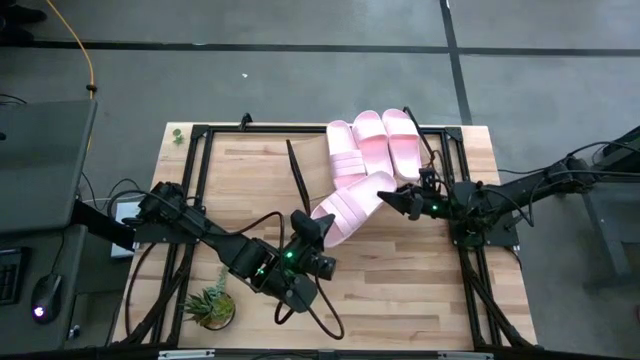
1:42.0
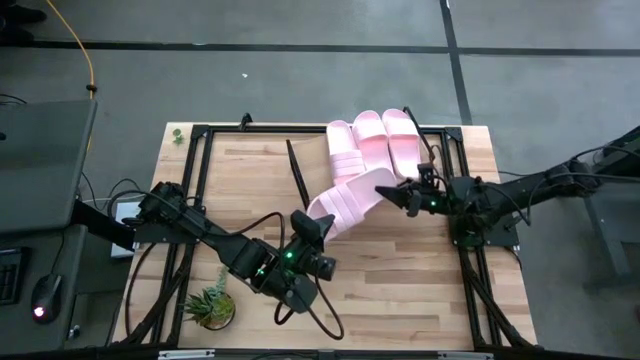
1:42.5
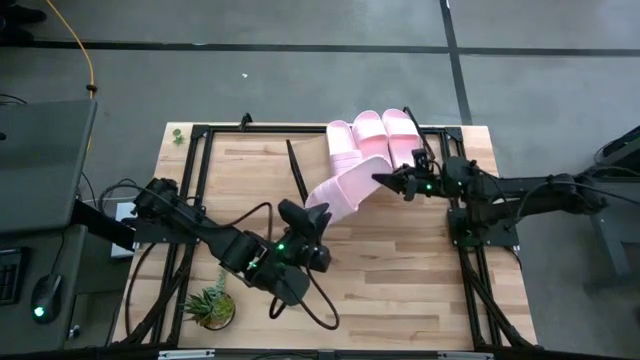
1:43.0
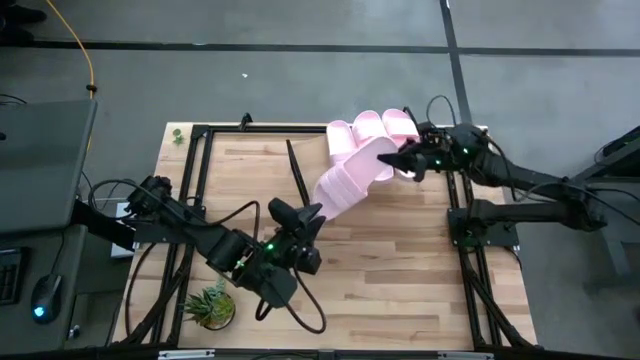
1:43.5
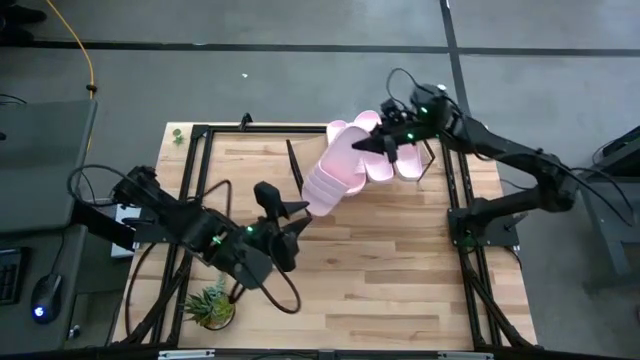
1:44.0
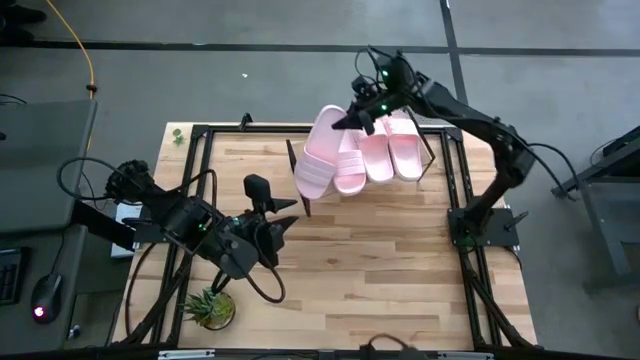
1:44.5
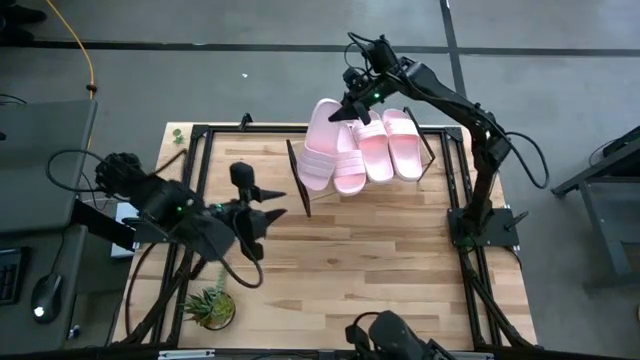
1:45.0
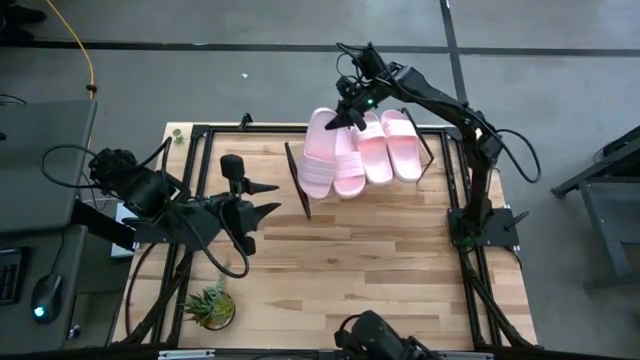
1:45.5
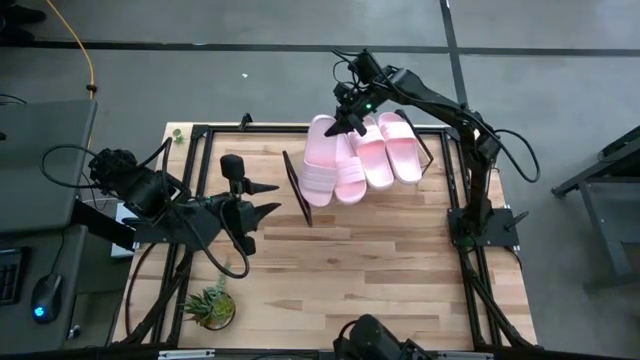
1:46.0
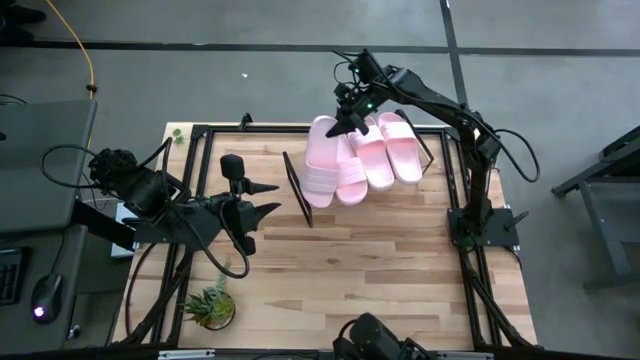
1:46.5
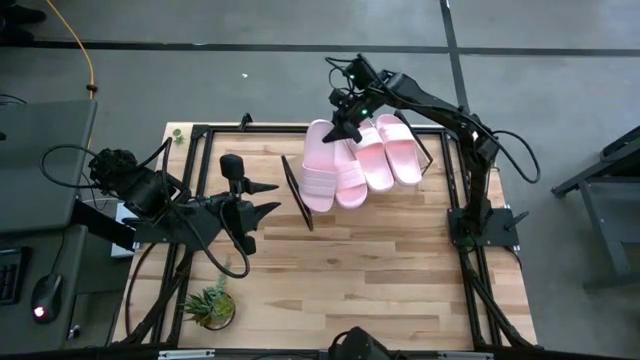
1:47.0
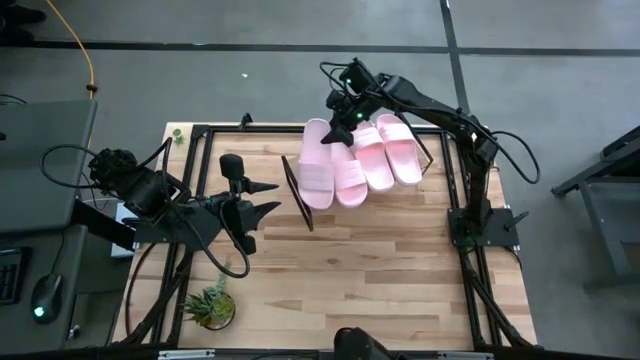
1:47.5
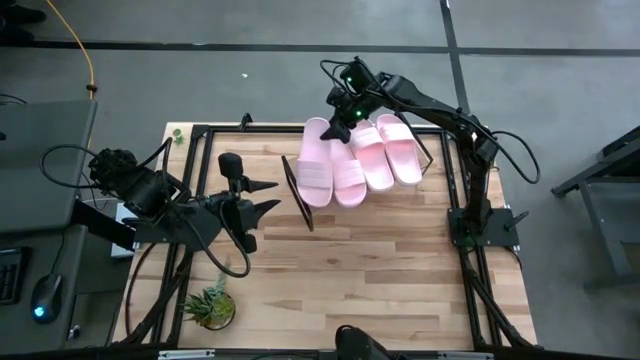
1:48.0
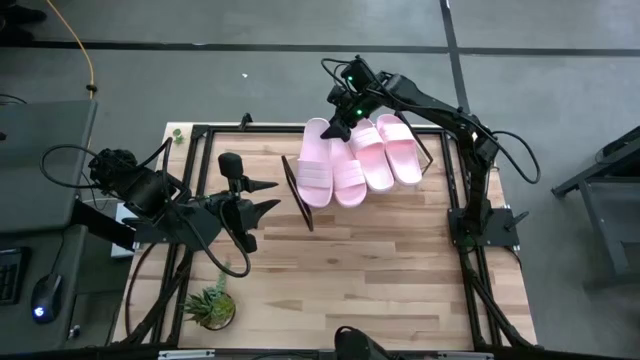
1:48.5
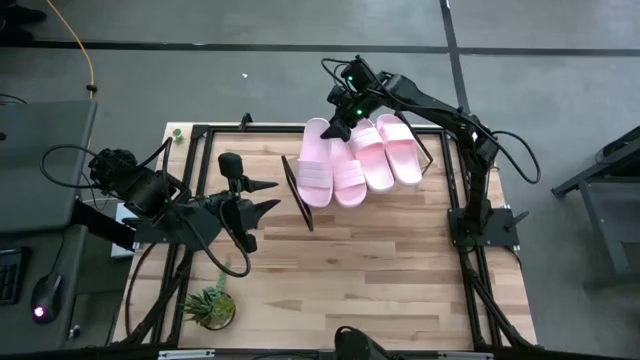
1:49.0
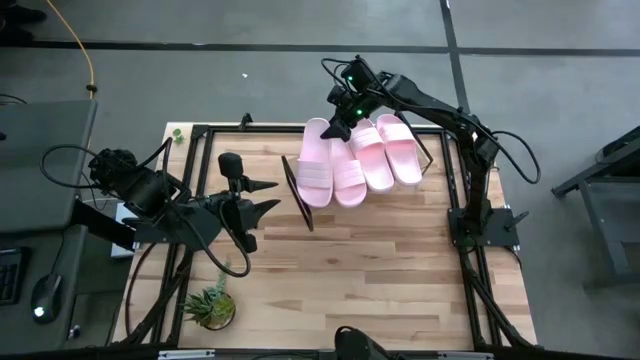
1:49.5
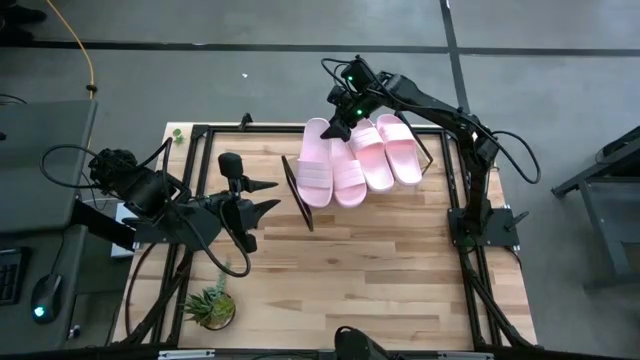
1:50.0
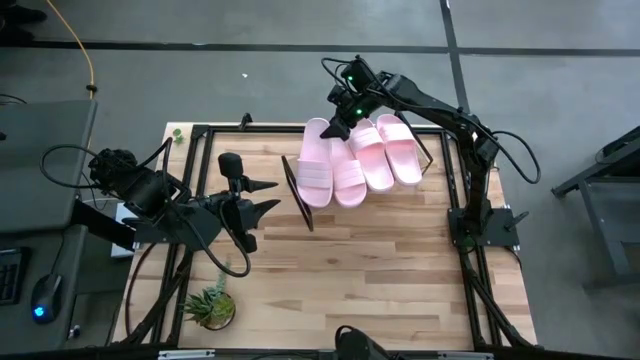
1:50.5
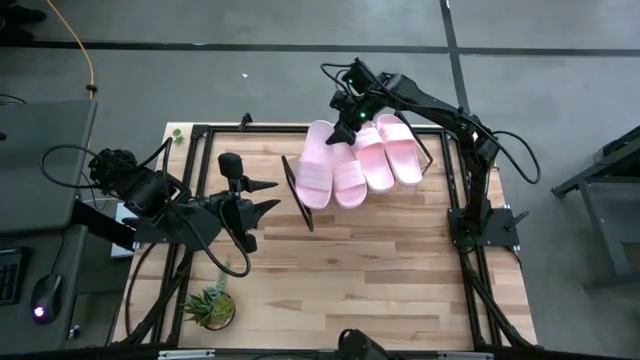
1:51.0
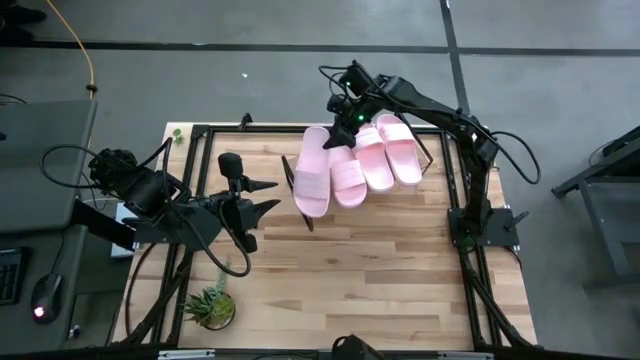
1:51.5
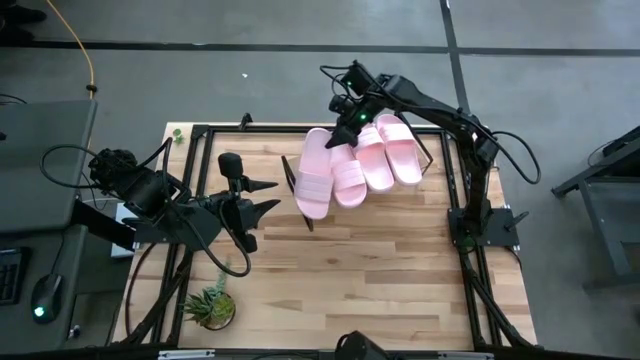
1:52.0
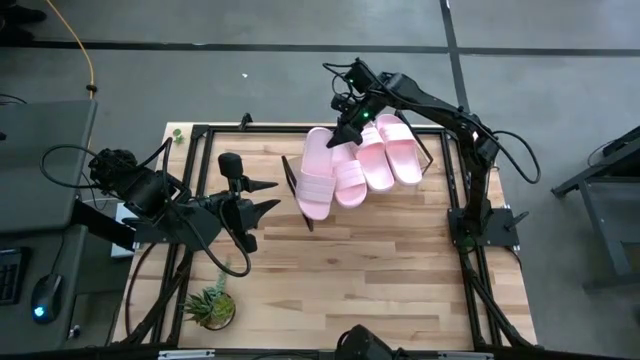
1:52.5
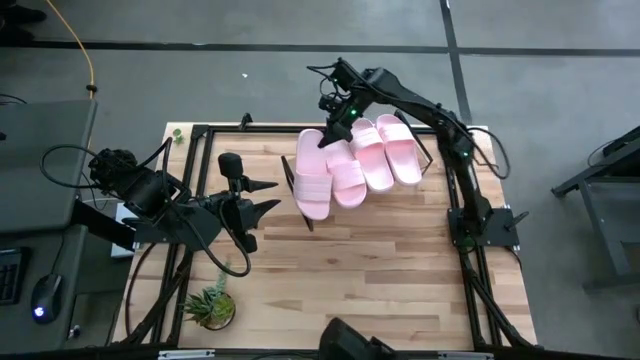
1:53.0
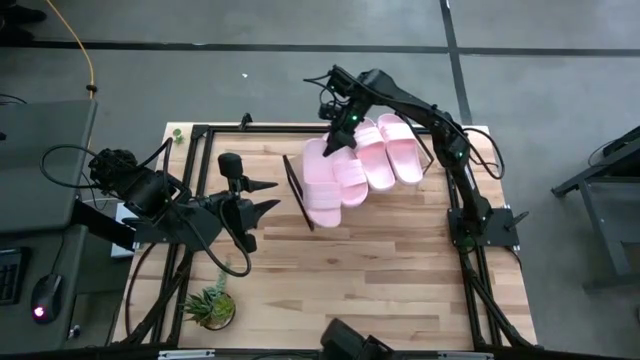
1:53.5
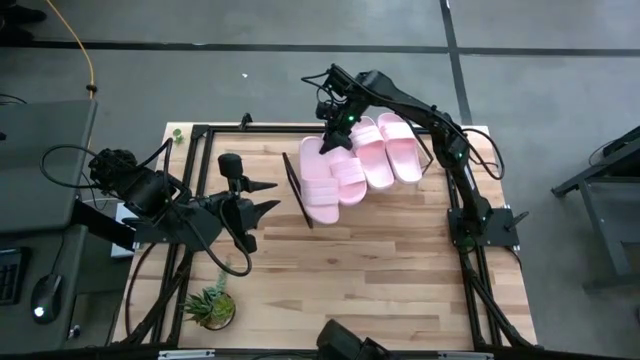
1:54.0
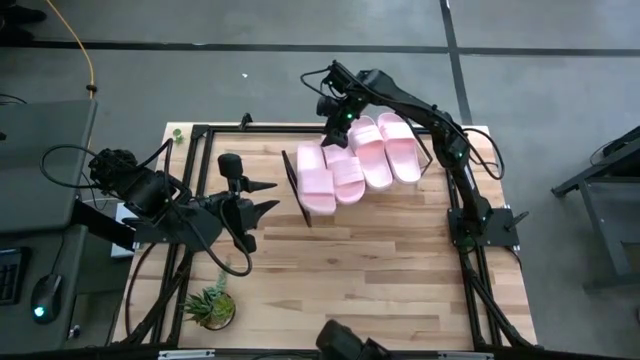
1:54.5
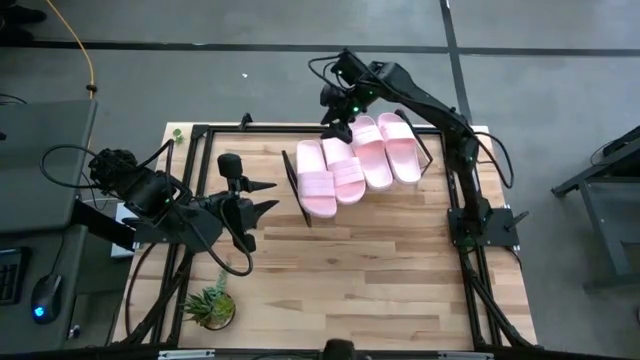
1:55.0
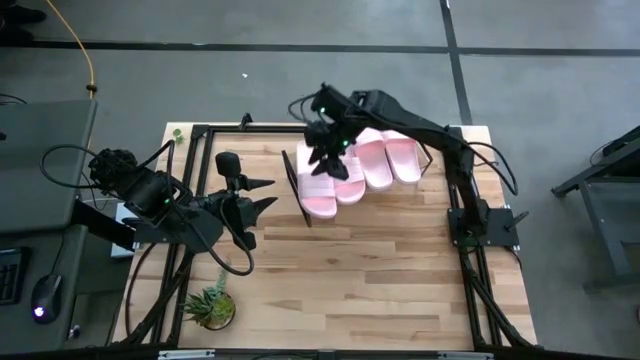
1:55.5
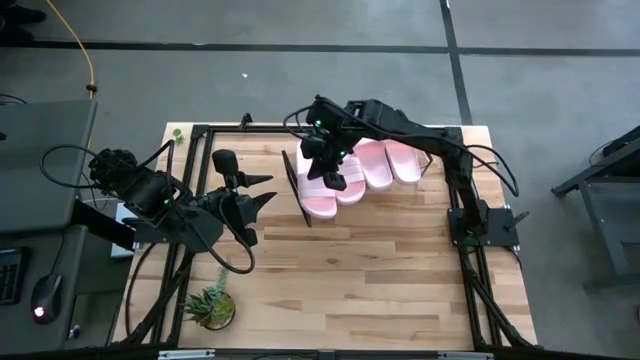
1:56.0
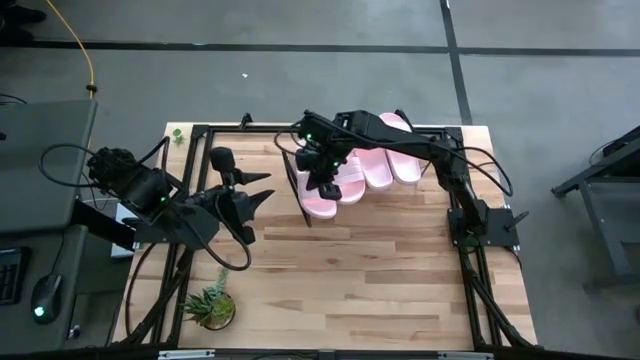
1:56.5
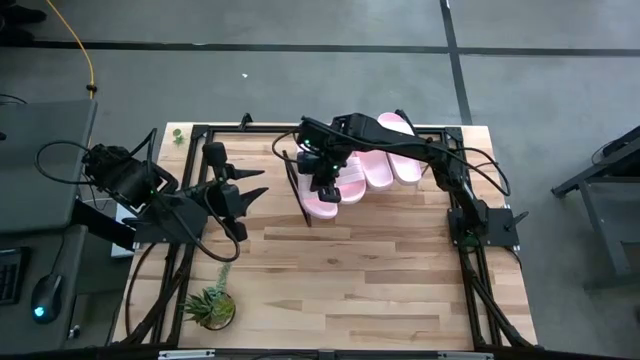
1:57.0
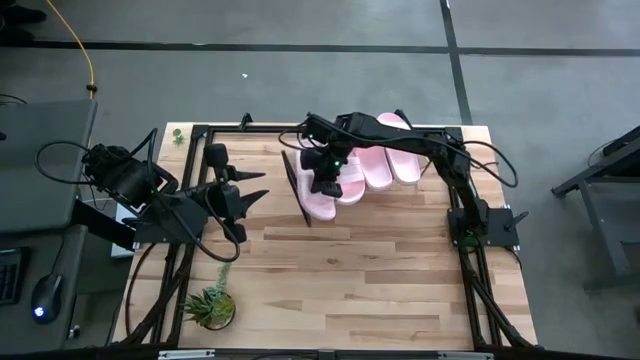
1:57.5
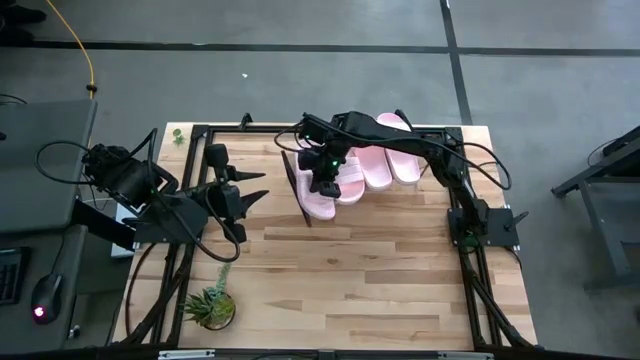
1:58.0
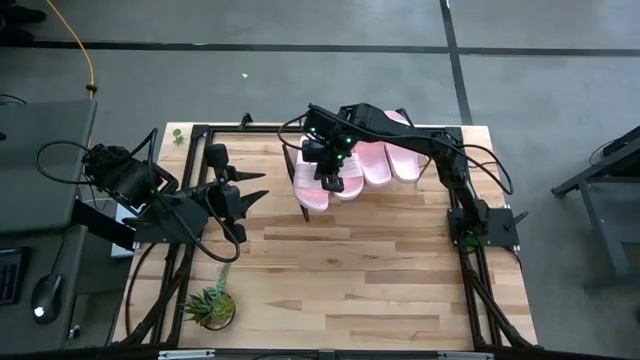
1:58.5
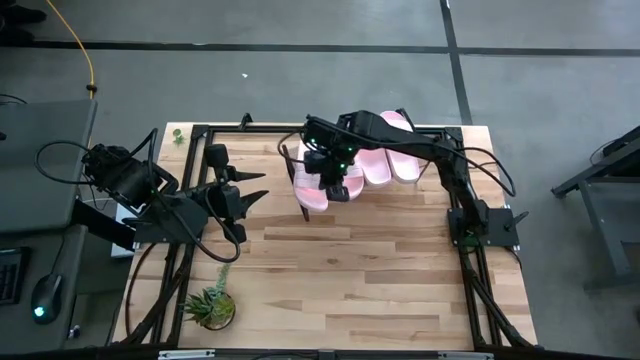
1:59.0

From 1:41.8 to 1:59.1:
Task: Pick and place slides into the shelf
Put the pink slide on the shelf

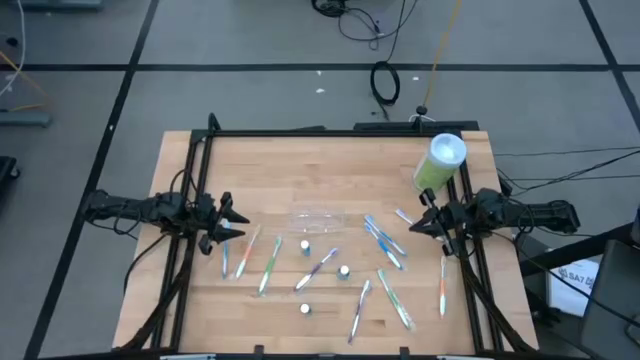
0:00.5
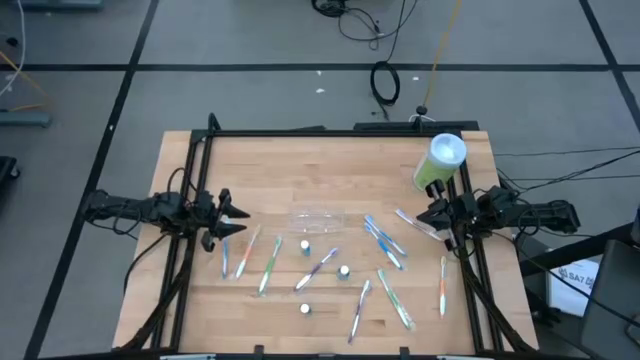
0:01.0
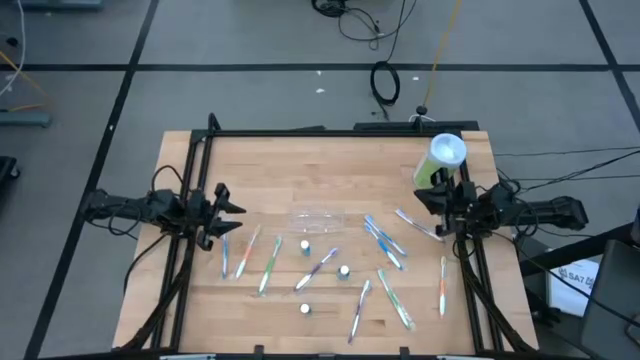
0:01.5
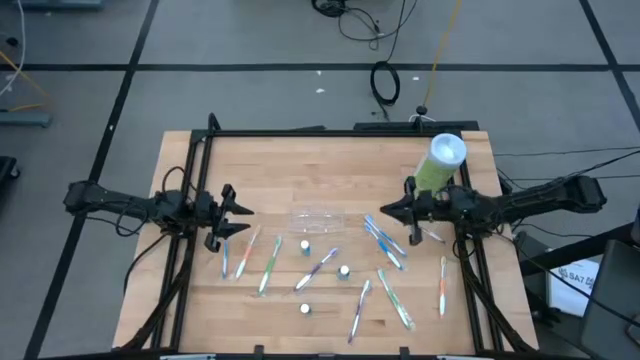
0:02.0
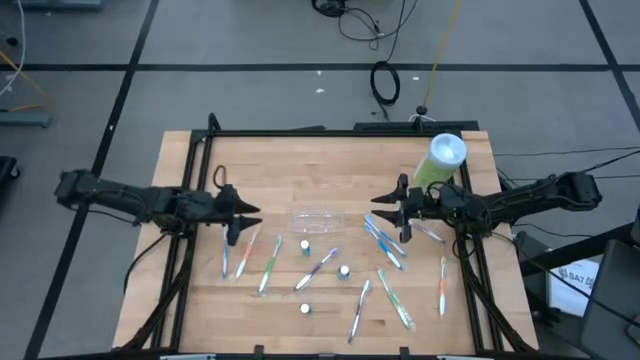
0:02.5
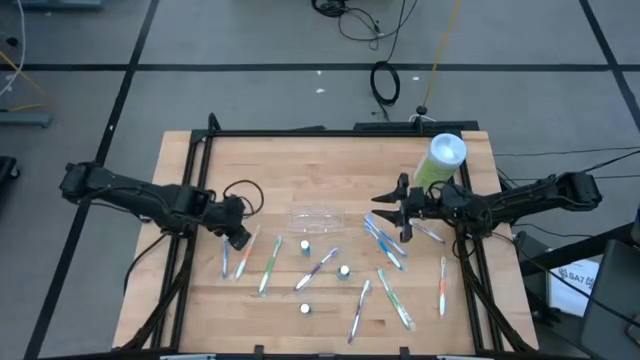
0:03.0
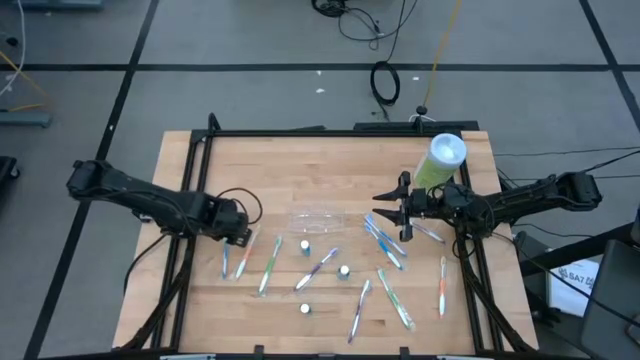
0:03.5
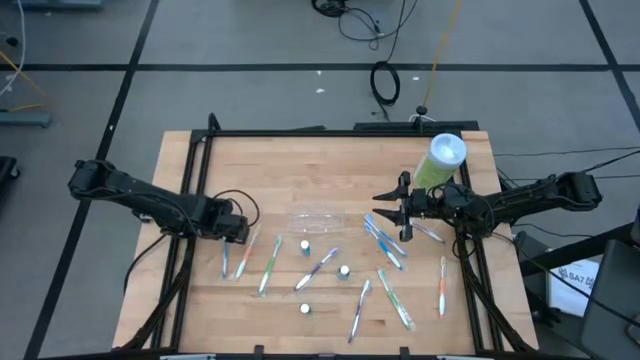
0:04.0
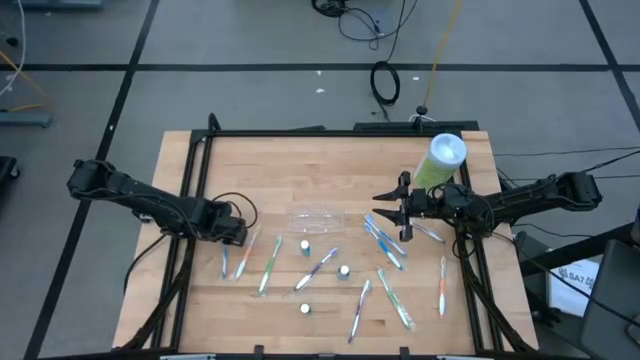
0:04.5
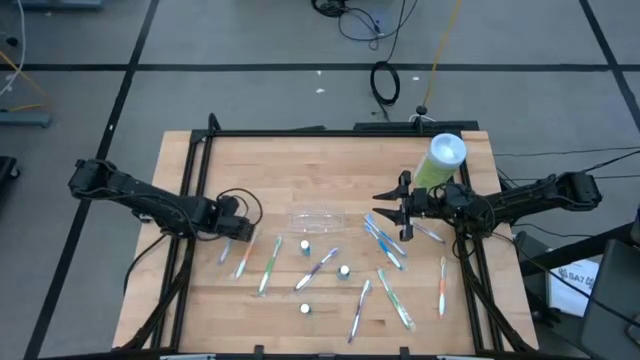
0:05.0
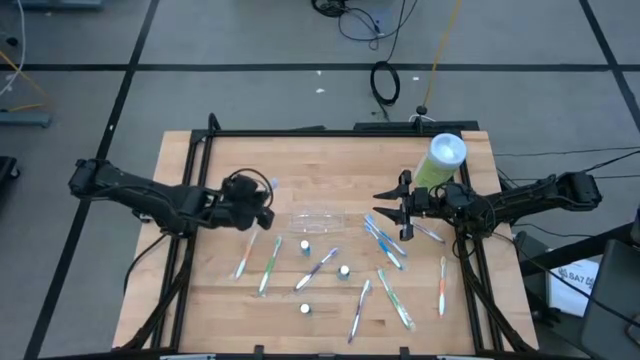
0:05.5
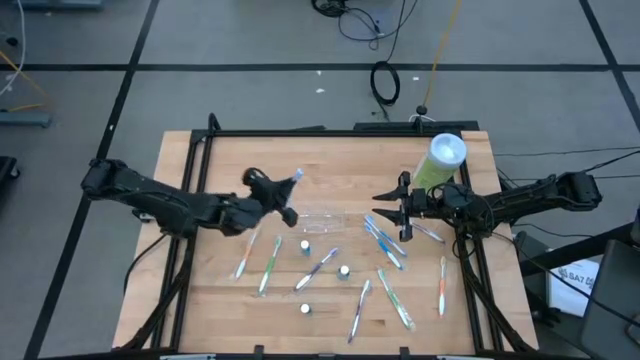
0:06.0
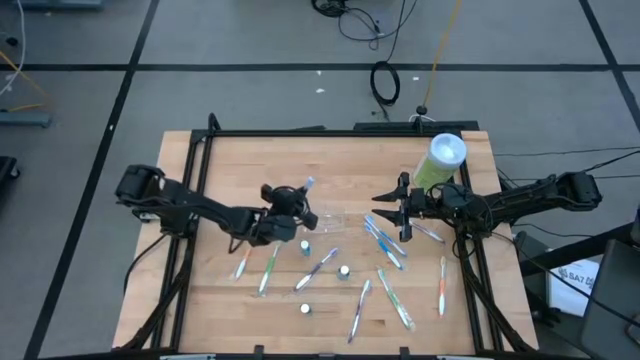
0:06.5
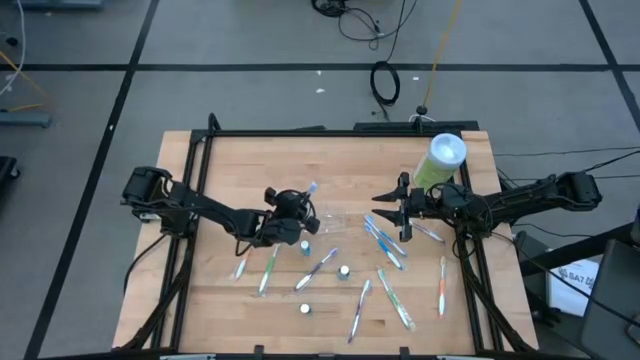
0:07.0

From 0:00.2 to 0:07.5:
Task: Pick & Place toothbrushing station
Put the left blue toothbrush into the transparent organizer
